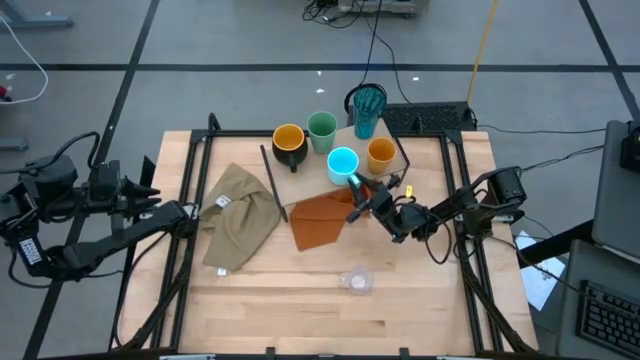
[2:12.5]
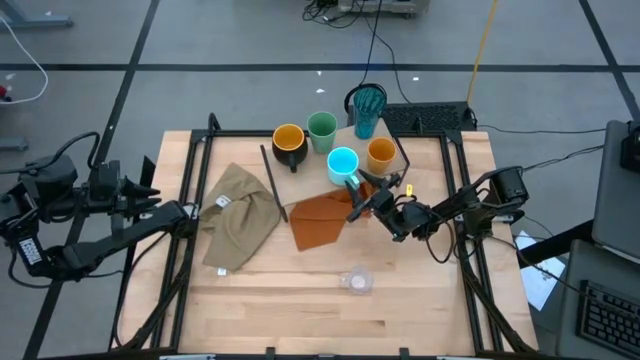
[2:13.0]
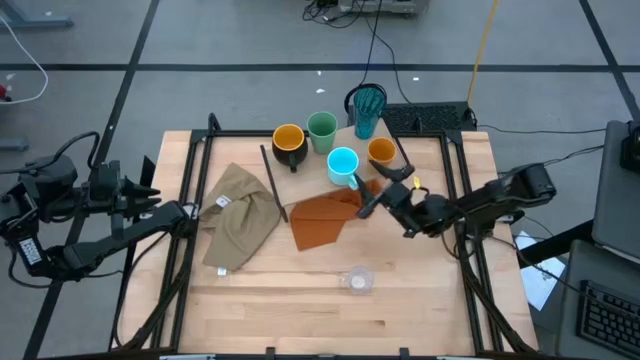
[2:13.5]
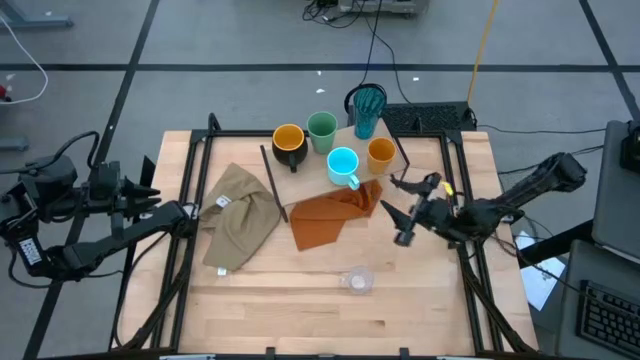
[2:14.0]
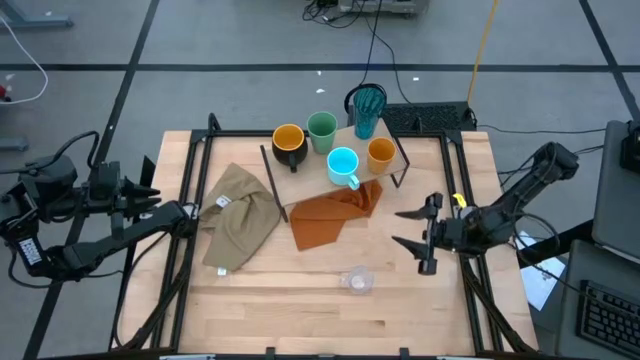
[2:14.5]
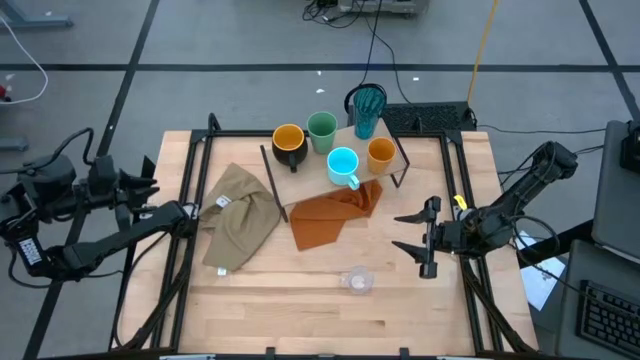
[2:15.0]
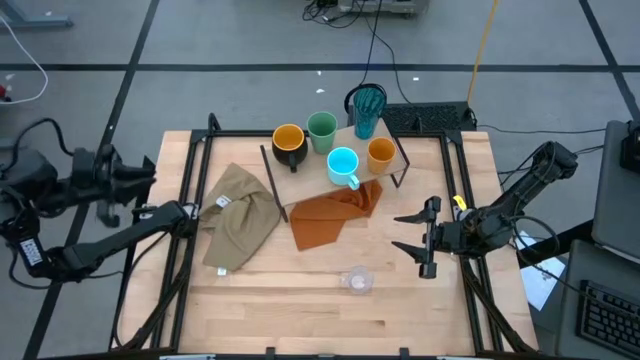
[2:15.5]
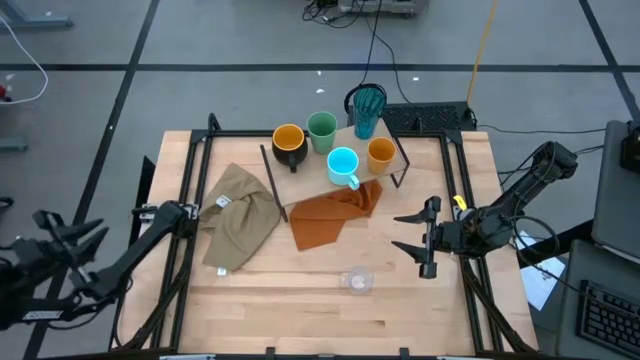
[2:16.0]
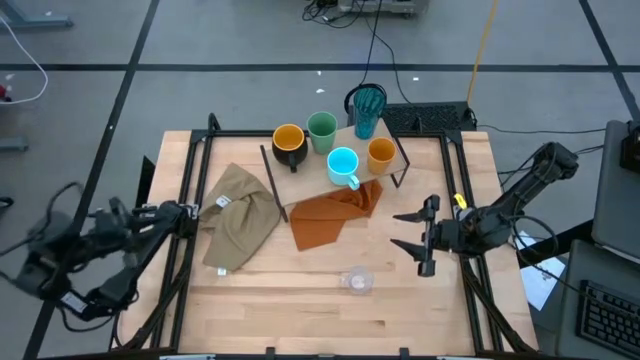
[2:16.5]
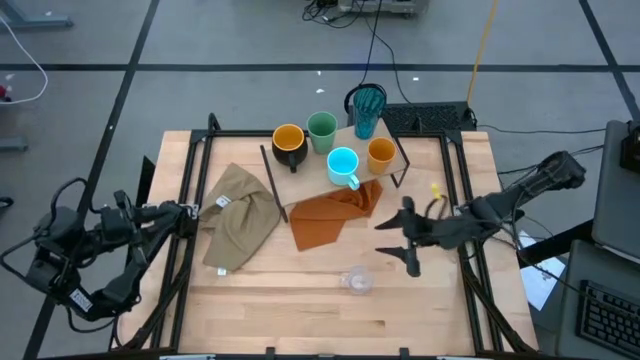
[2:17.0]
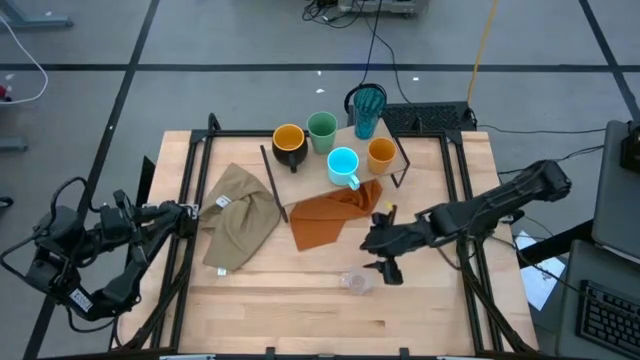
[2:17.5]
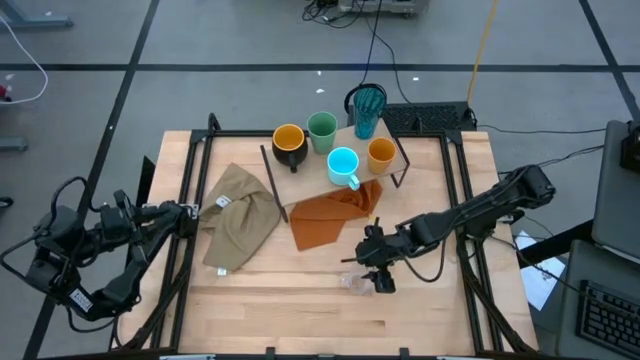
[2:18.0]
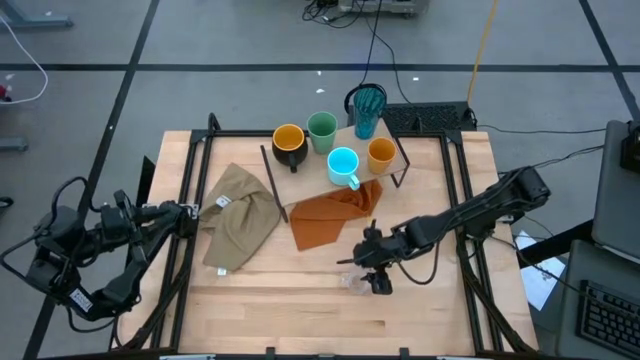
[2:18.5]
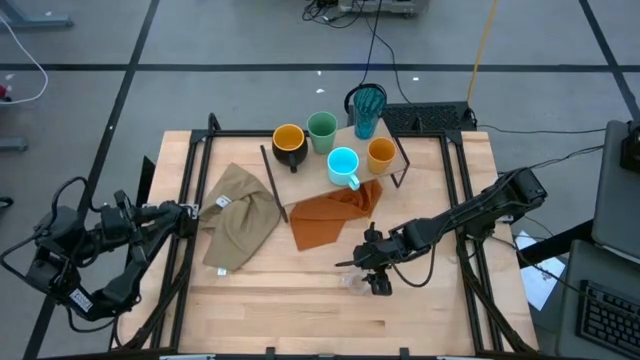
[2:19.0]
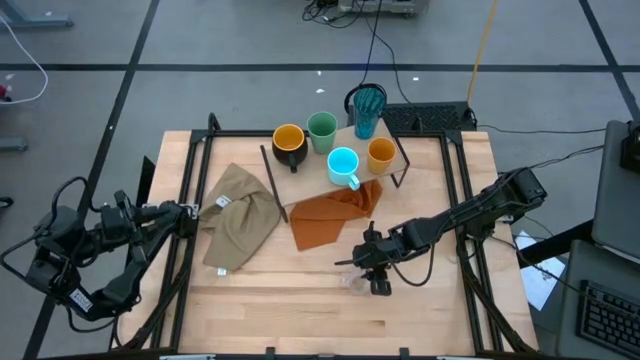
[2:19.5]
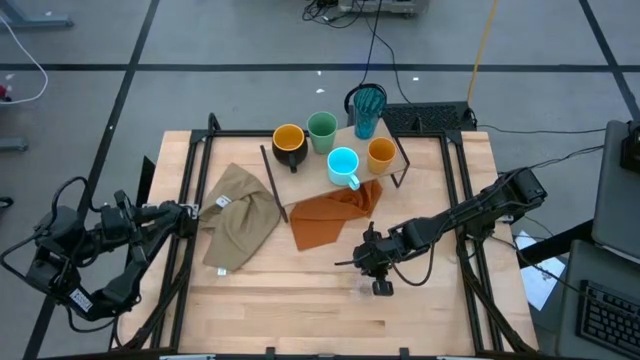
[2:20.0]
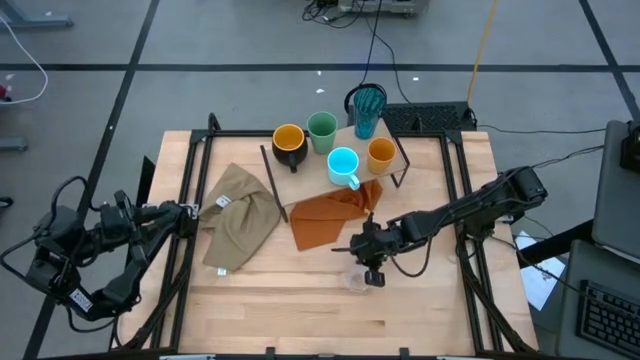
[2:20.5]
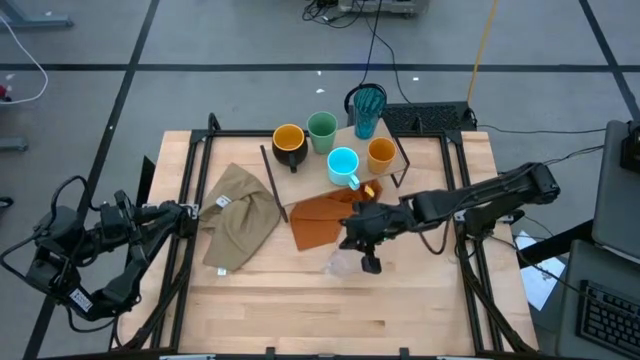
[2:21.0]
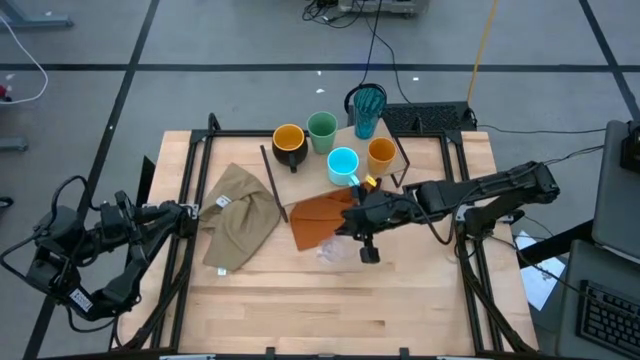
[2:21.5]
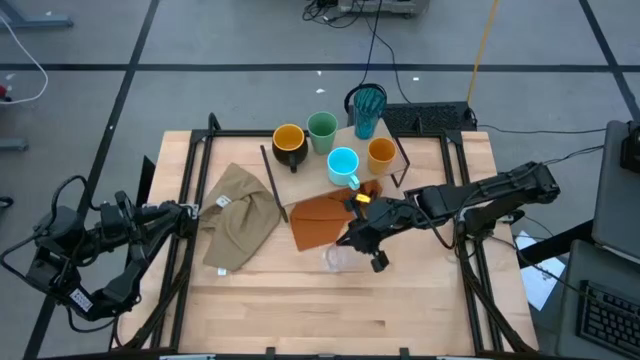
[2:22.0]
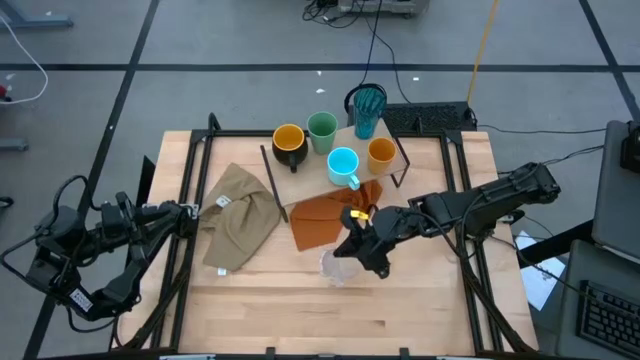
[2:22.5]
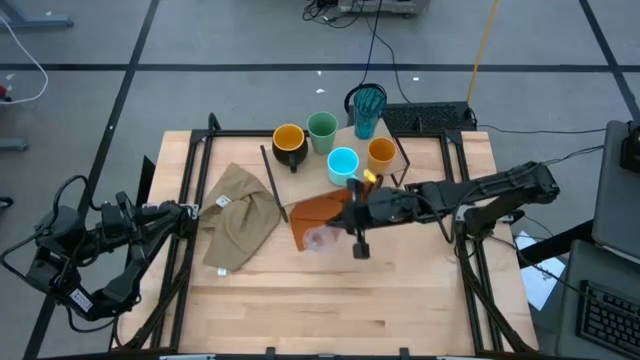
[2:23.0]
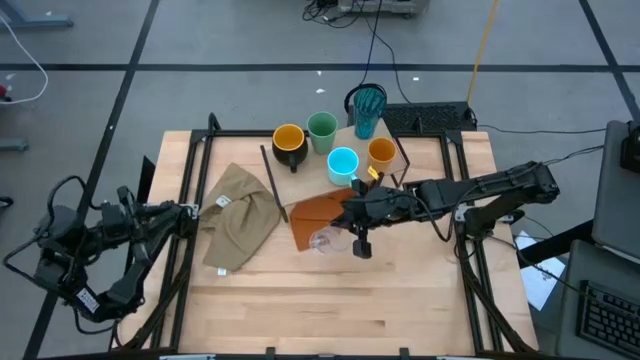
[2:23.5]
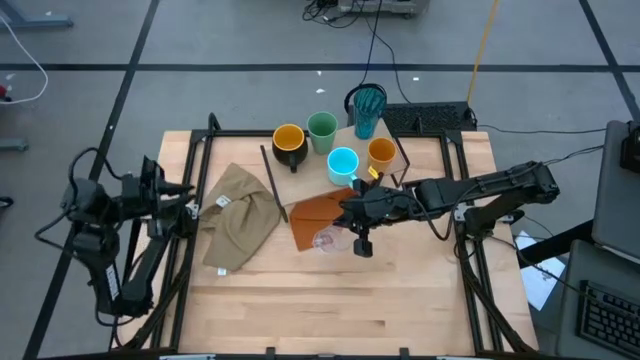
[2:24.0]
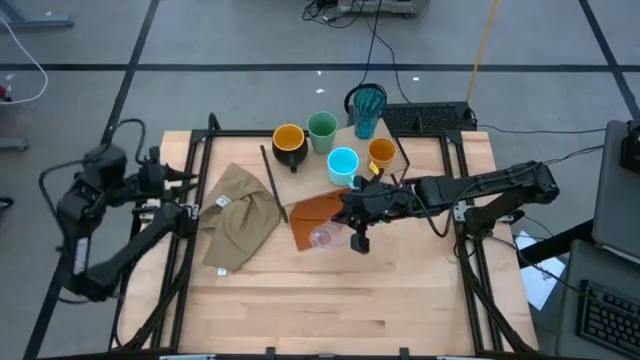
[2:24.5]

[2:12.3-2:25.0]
Task: Stack small to large cups/mugs on shelf
Put the transparent mug on the shelf

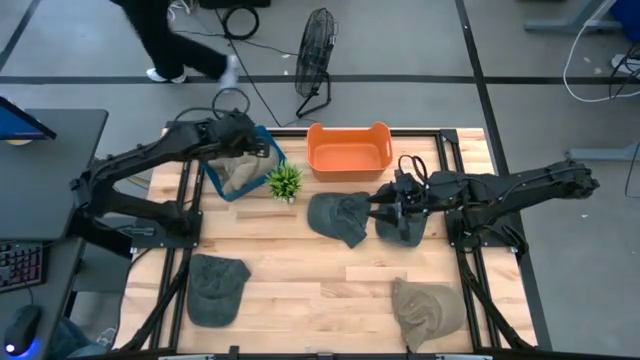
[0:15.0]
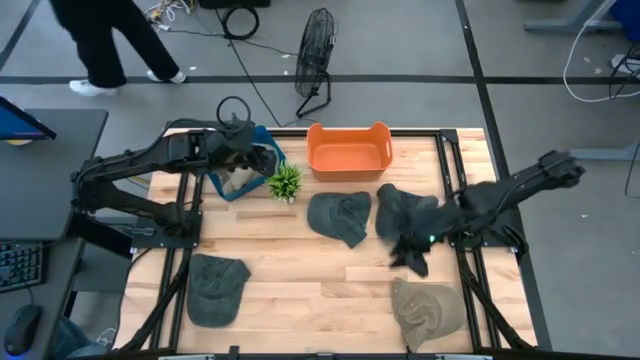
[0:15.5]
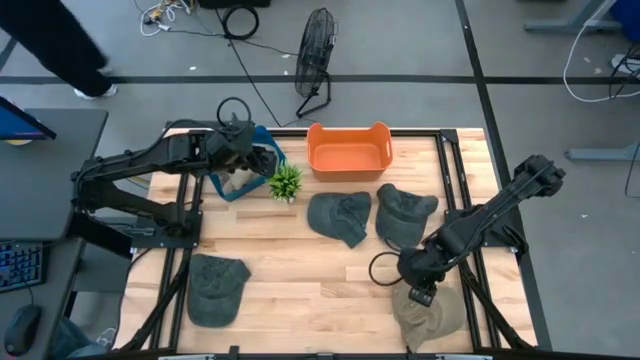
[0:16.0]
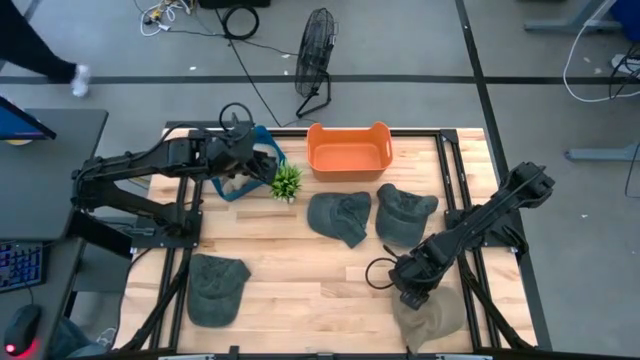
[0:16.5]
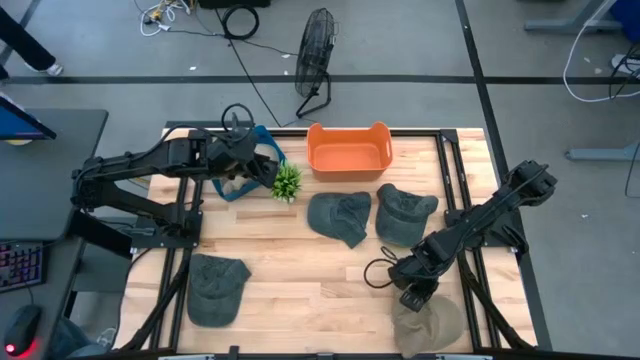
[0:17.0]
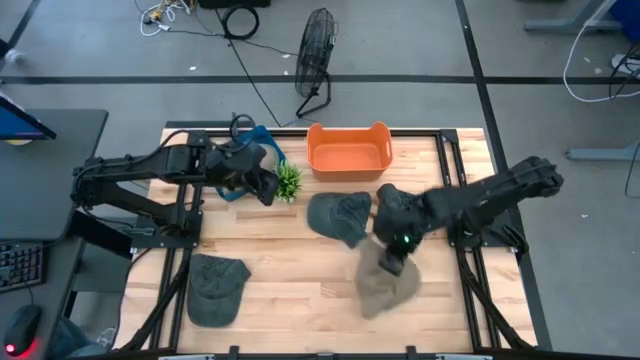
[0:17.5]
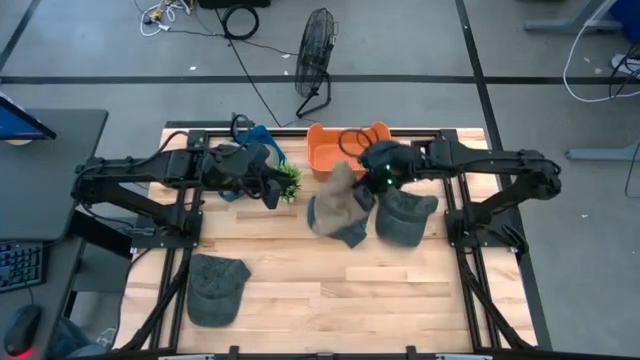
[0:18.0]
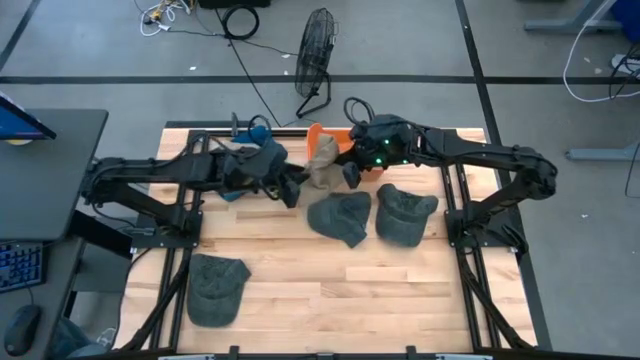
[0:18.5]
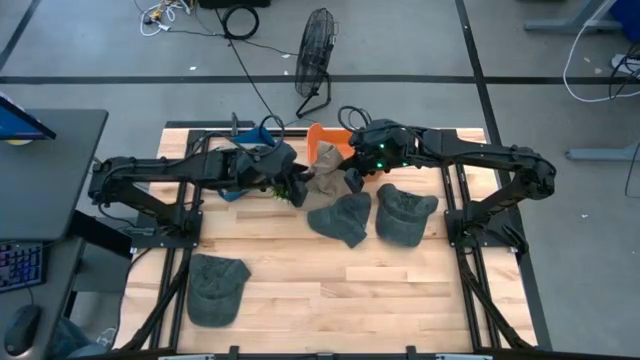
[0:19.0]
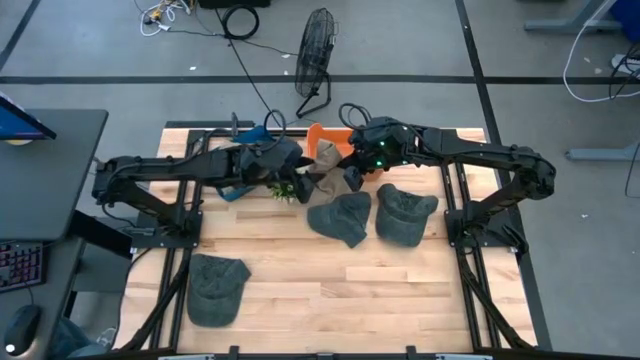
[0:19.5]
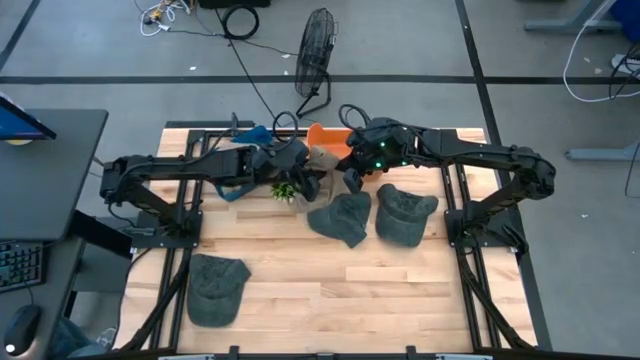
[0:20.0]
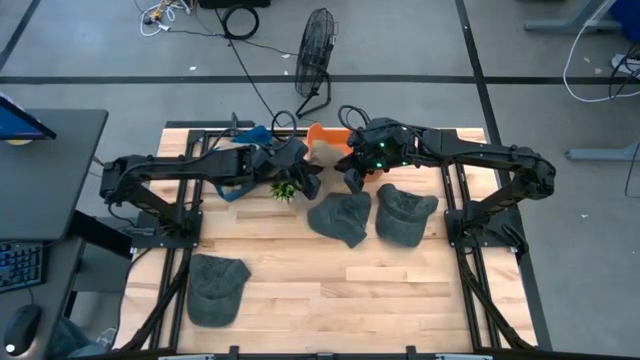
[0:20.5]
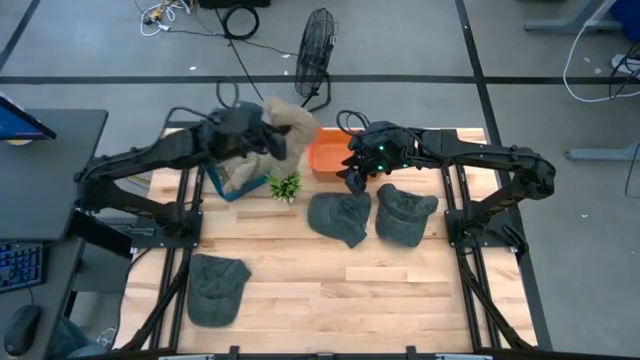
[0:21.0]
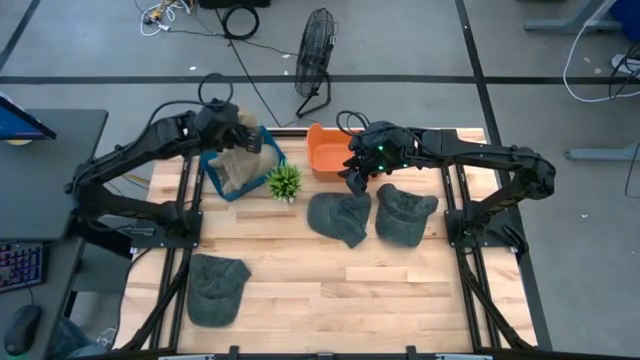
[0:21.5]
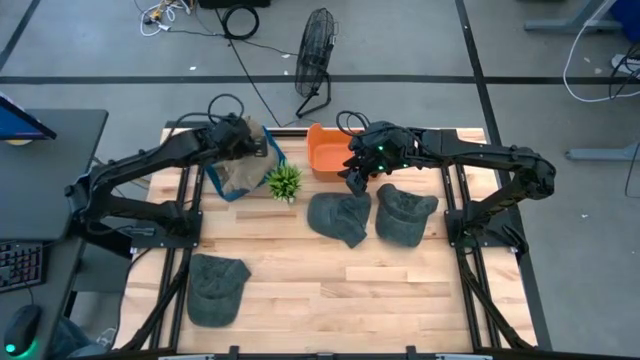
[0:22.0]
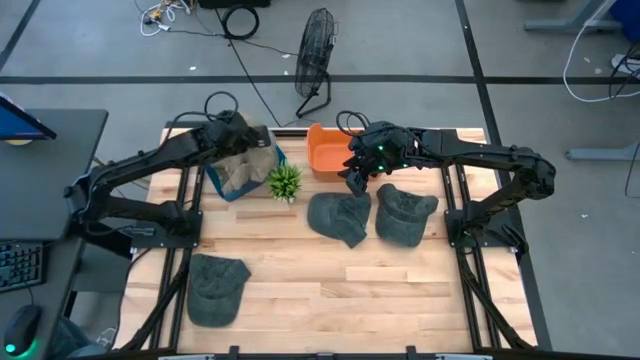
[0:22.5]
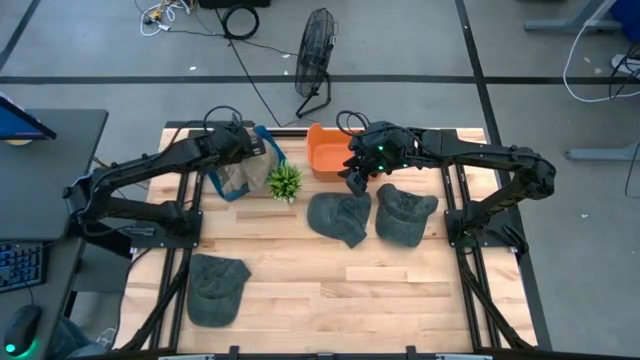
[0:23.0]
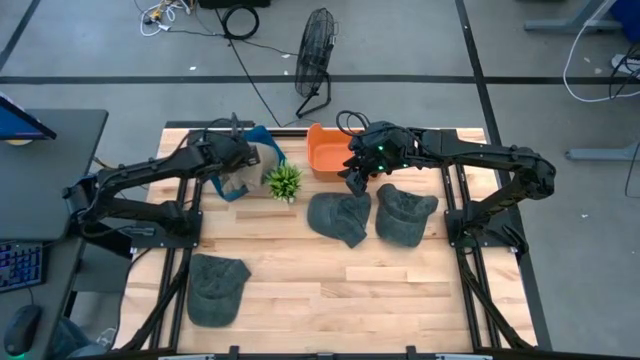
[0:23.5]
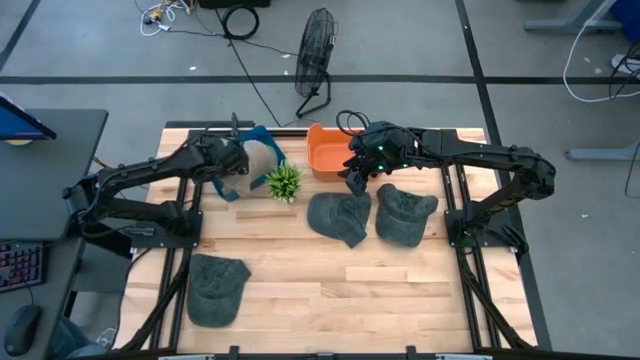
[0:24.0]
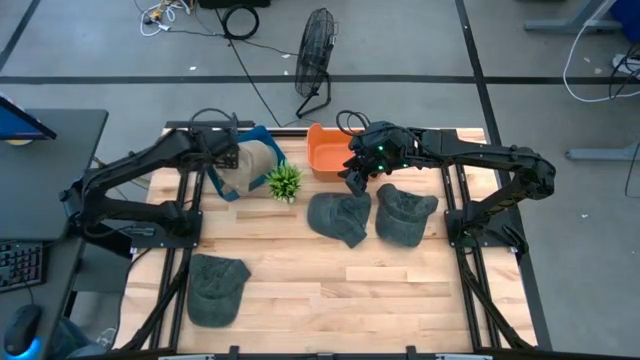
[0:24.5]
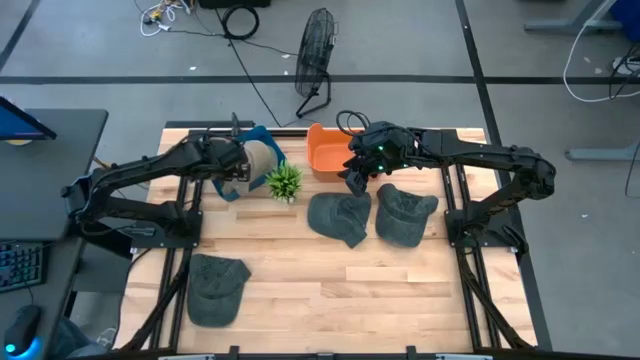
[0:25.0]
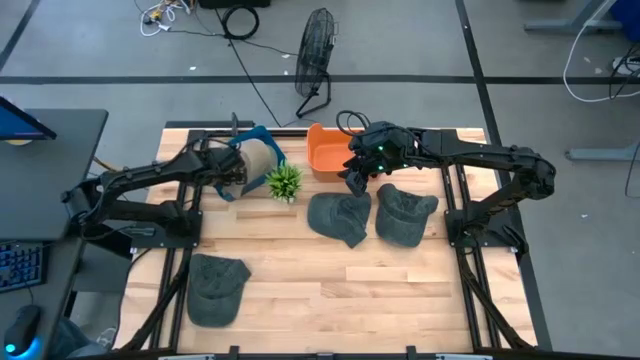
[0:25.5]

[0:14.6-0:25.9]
Task: Pick & Place hat
Put the brown cap into the blue bin
